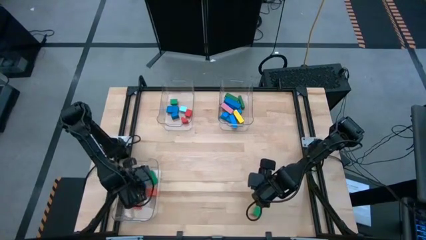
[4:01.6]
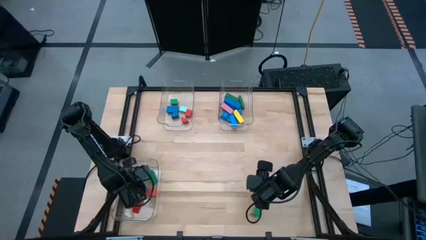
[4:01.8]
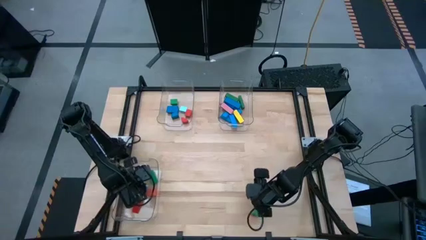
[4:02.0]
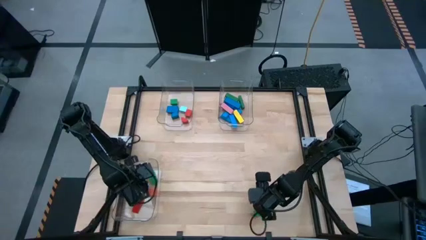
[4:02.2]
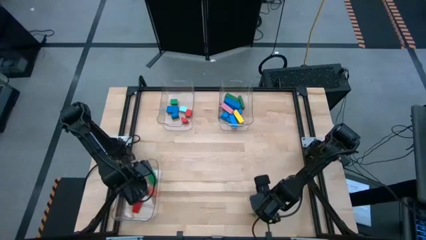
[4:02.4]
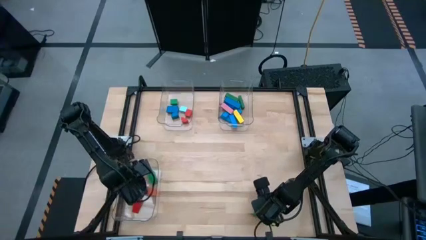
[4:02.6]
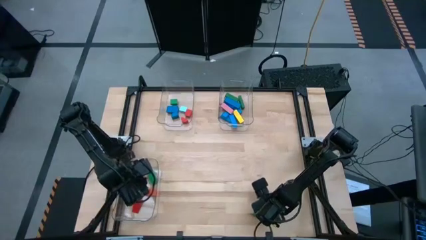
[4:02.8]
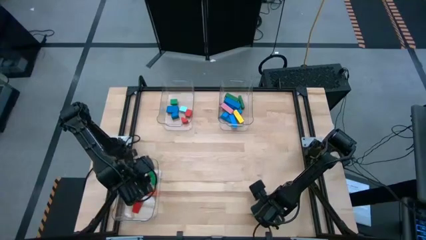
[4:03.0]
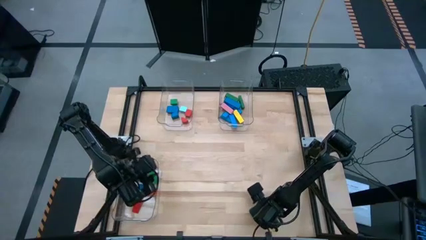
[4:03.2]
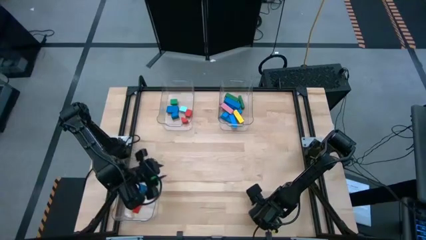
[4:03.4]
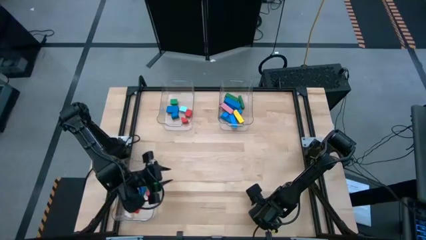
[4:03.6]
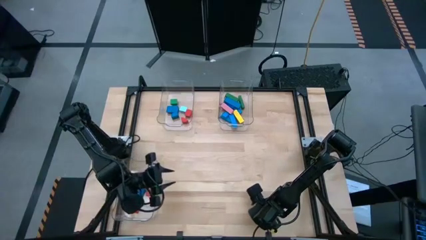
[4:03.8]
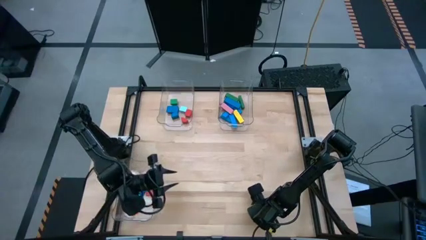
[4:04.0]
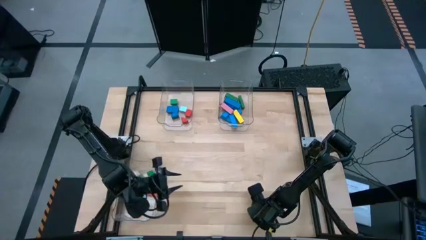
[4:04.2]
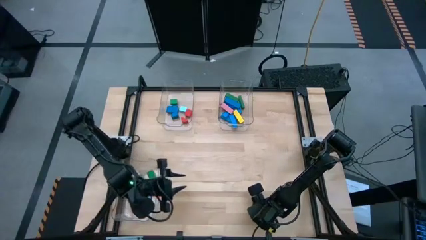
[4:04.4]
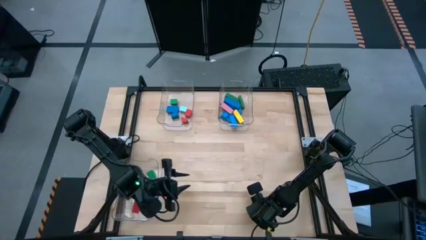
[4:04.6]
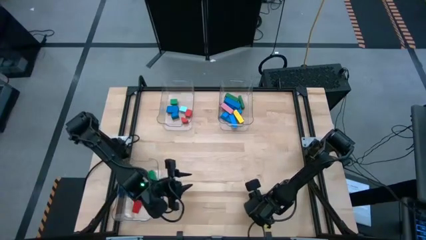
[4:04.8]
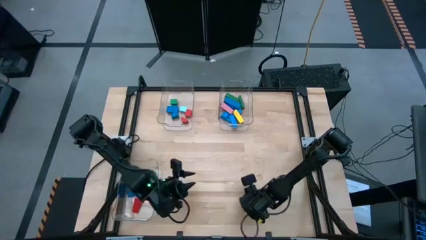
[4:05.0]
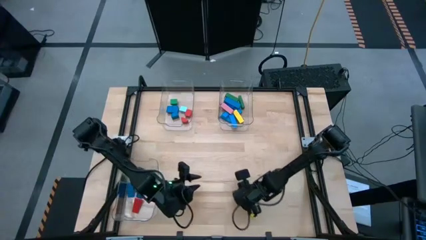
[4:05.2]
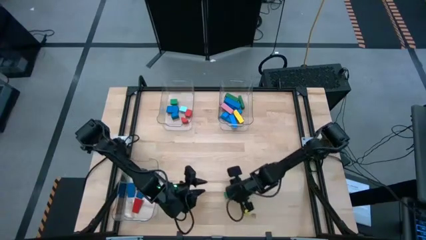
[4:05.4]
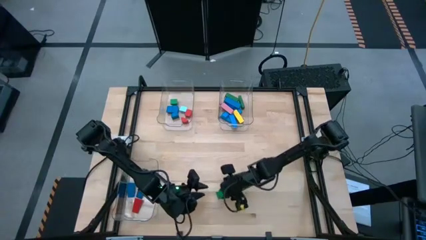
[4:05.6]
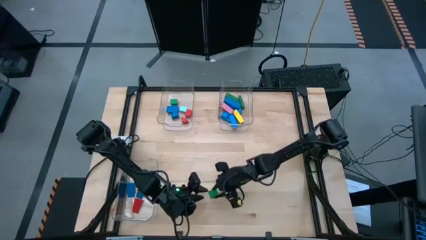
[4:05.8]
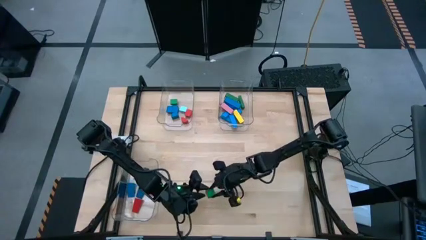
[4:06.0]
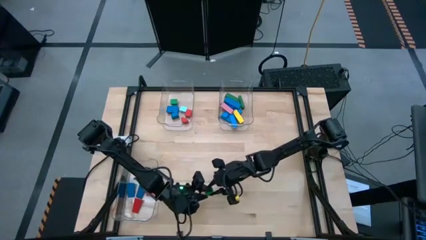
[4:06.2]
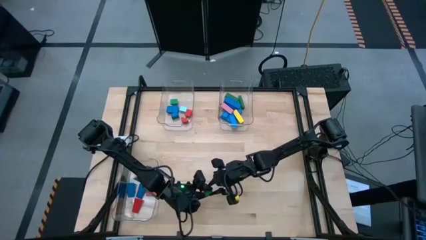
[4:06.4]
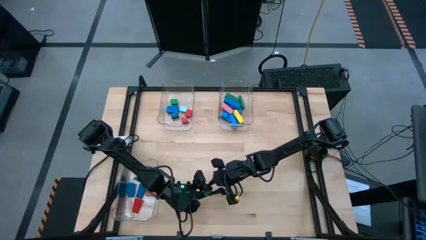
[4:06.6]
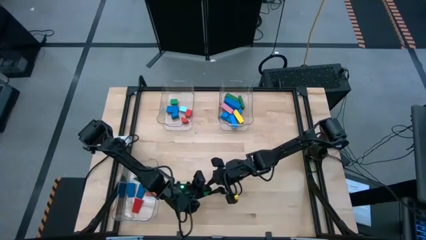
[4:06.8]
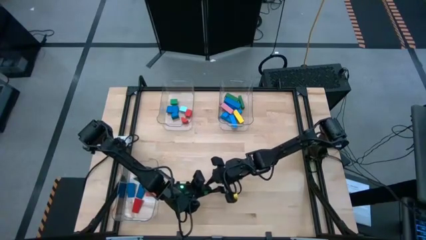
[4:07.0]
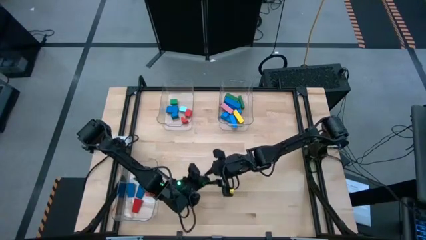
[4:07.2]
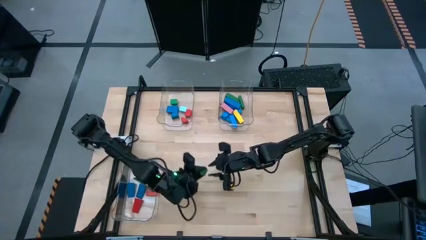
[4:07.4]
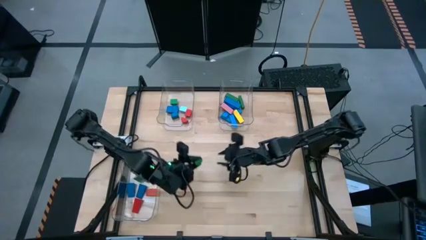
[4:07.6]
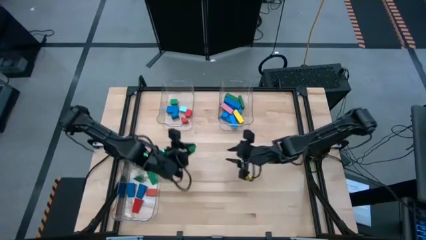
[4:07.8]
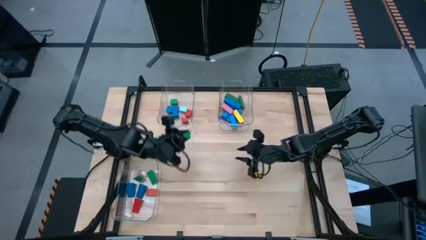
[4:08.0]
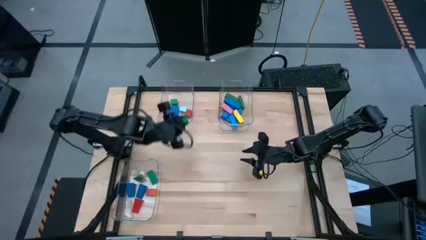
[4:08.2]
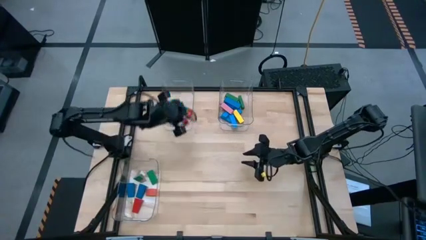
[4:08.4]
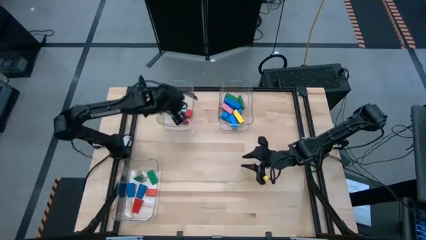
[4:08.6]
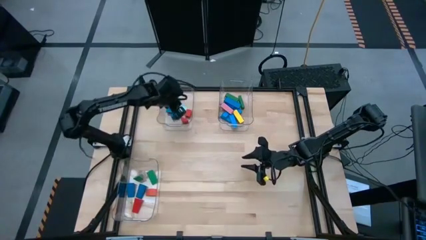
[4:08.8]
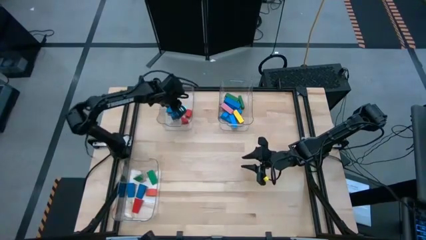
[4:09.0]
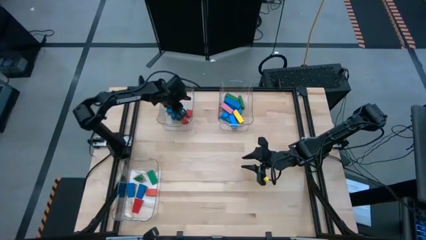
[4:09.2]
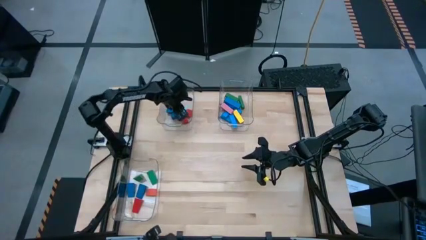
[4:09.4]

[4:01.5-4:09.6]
Task: Sort blocks by size
Put the green half cylinder block into the top left transparent bin

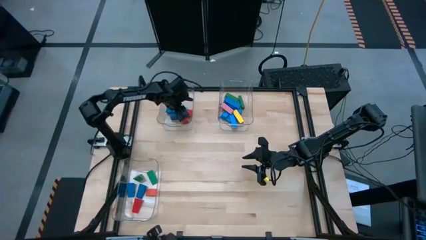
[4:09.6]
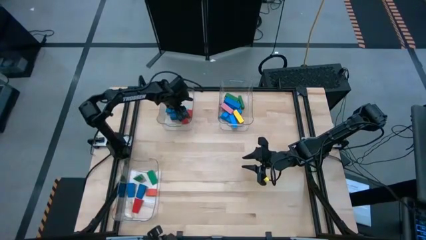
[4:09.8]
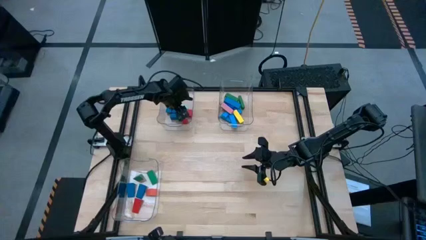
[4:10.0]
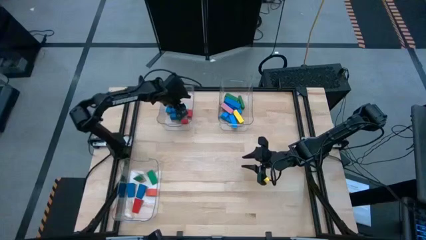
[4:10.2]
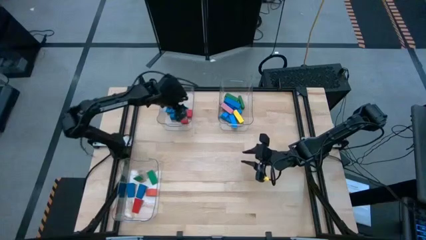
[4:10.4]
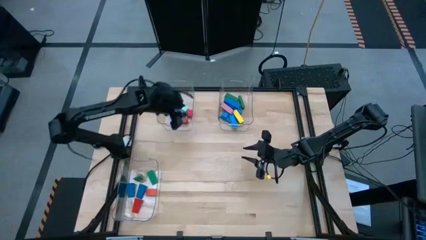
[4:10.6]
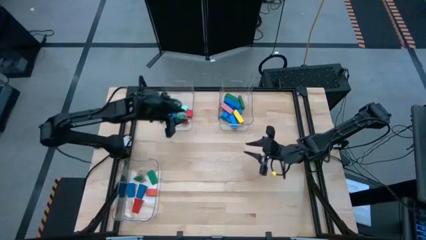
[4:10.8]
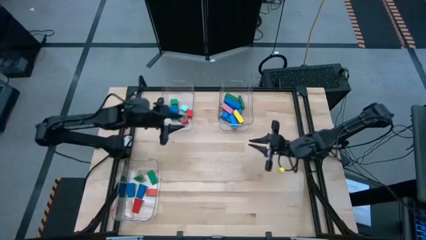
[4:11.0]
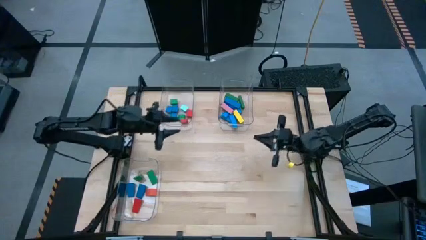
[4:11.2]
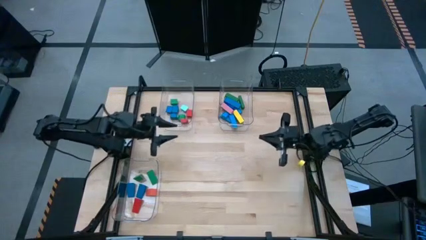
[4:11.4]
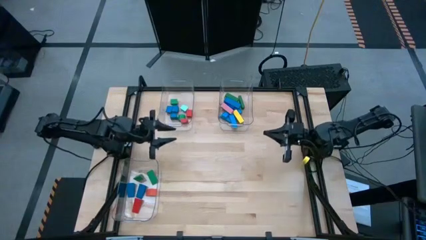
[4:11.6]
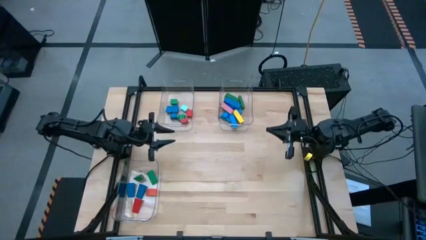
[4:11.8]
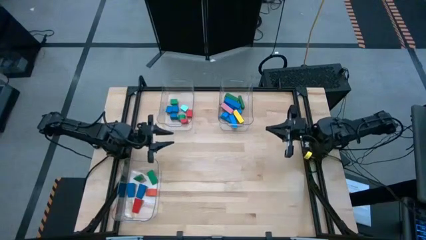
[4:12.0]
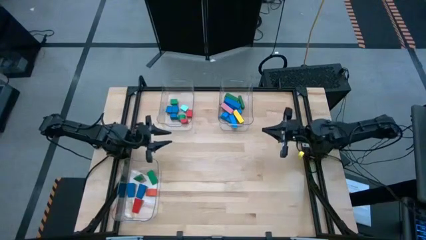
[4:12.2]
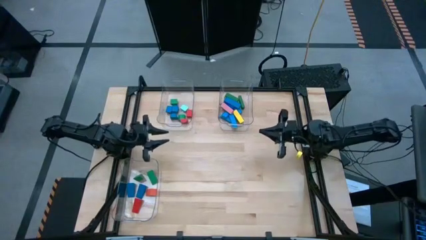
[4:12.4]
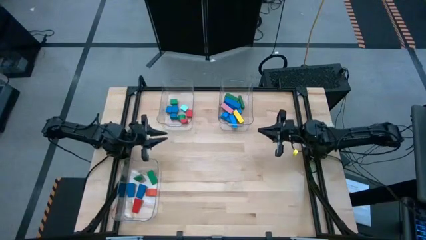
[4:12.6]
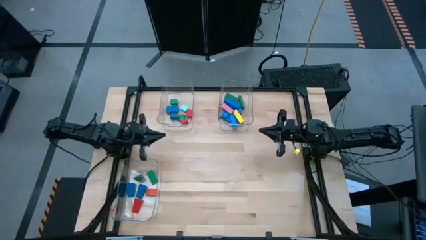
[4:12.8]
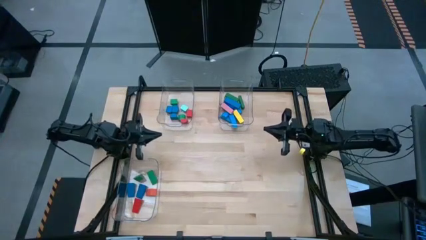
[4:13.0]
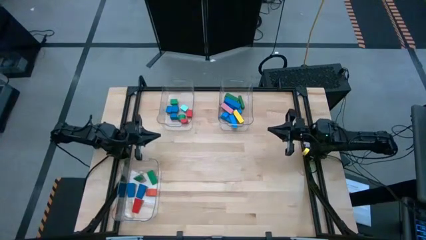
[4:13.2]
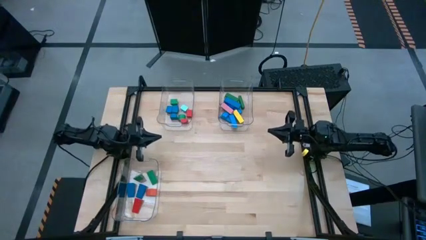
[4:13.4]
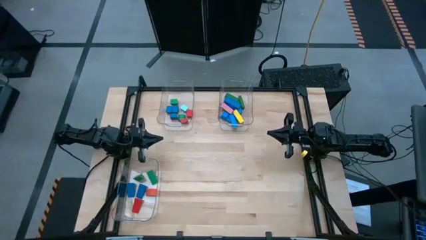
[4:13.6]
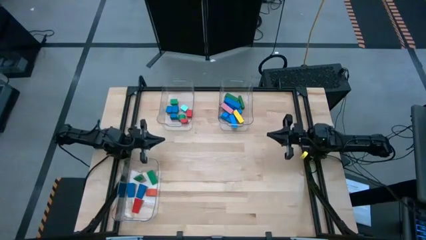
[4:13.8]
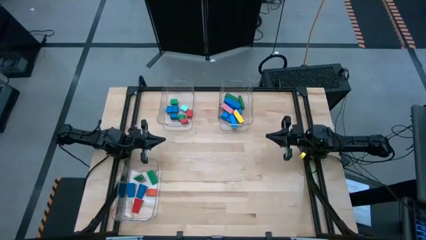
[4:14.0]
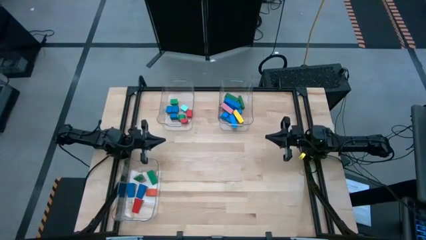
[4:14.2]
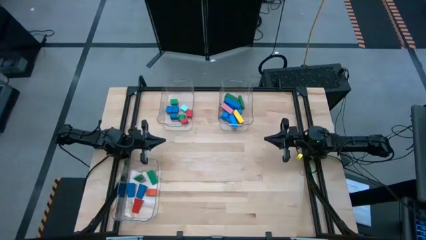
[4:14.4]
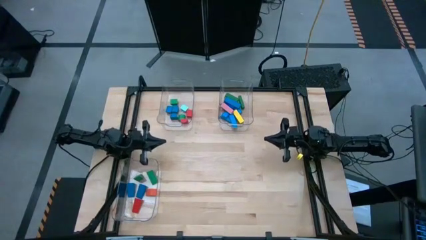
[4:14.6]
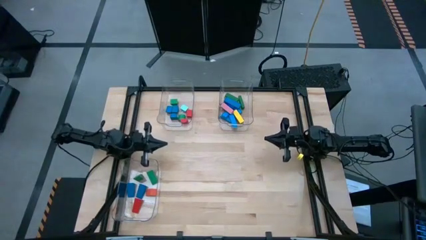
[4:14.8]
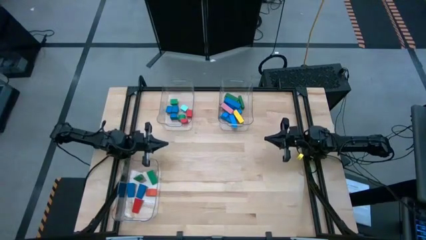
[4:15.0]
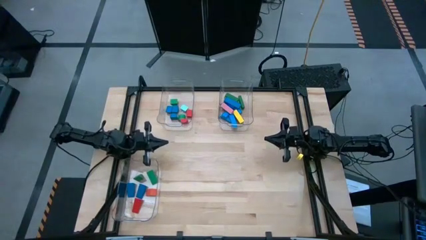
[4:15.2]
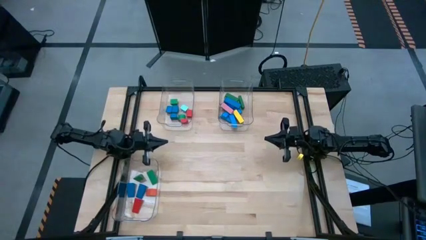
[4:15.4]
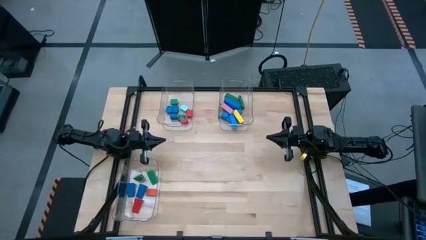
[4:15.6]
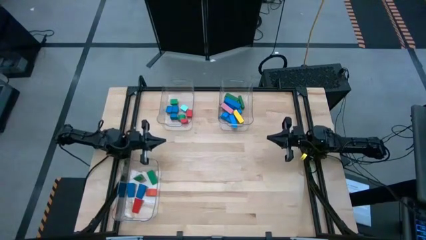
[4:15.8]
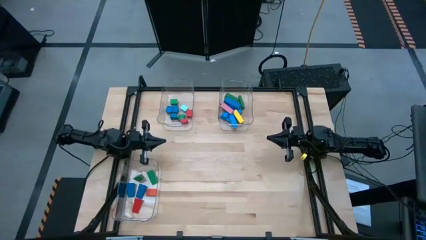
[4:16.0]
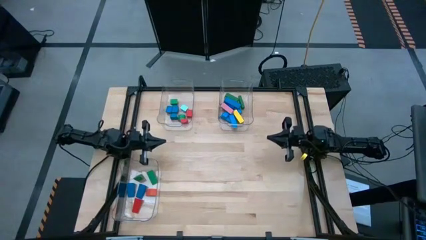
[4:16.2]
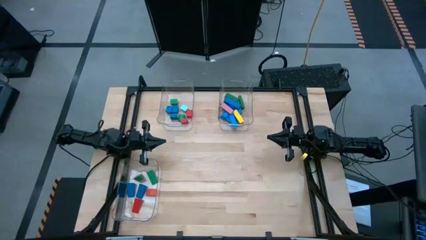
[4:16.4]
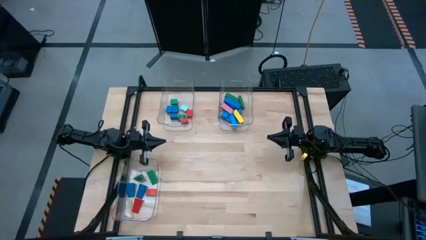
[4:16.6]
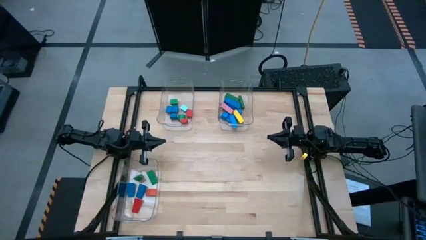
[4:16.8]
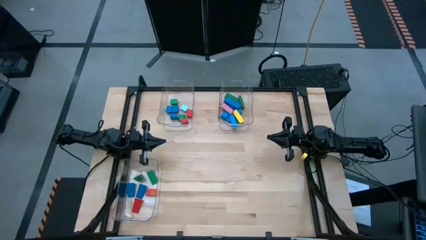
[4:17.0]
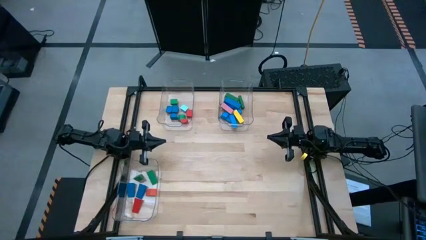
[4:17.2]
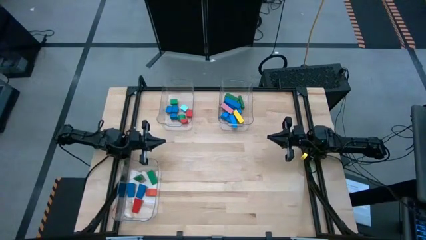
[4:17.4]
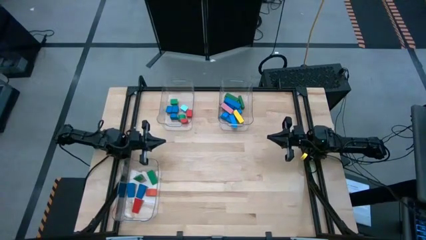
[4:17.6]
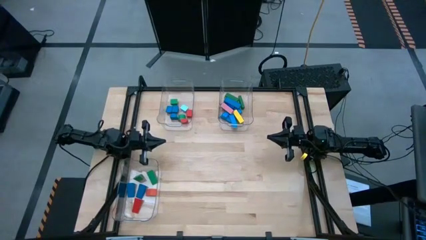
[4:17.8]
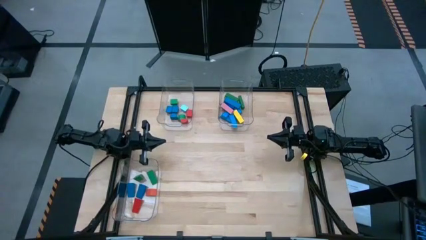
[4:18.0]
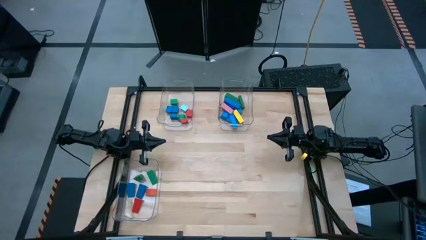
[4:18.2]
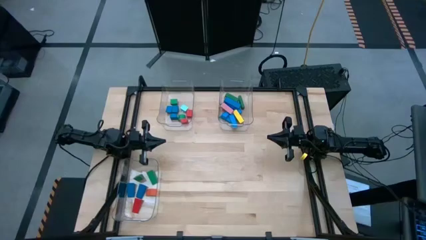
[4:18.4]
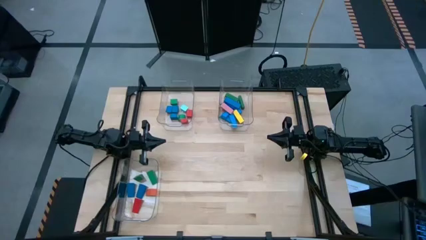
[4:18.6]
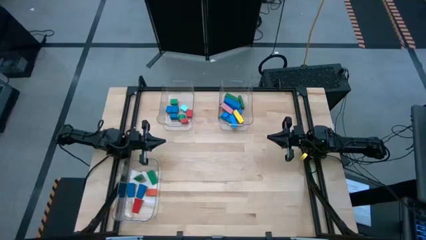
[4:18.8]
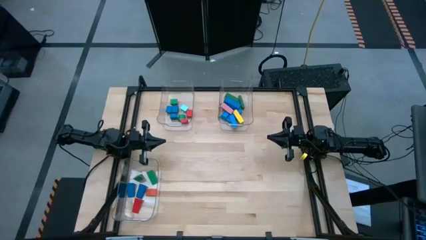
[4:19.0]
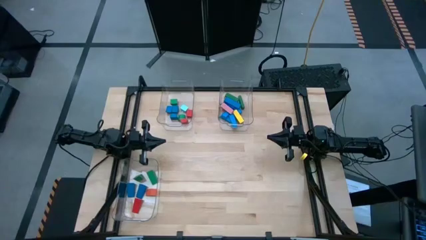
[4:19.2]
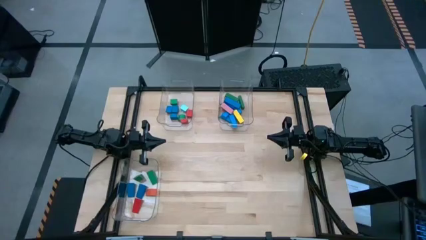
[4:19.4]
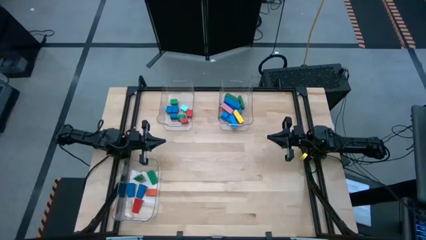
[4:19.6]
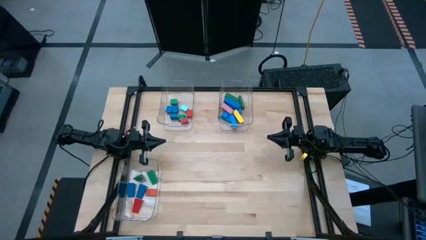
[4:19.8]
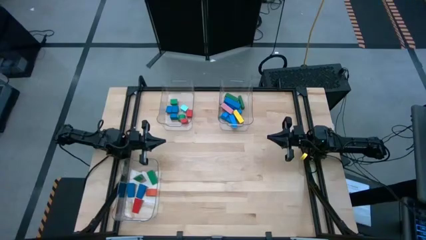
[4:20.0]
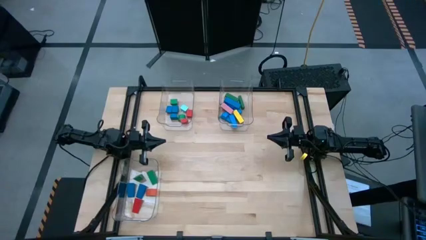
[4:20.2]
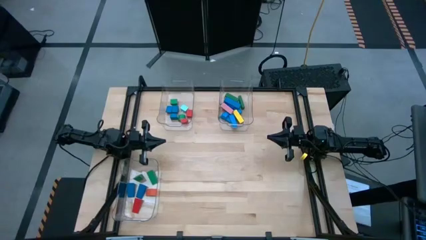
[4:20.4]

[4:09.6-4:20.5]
Return to Home Position
